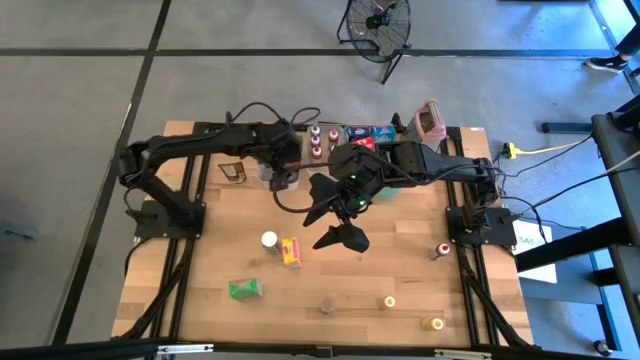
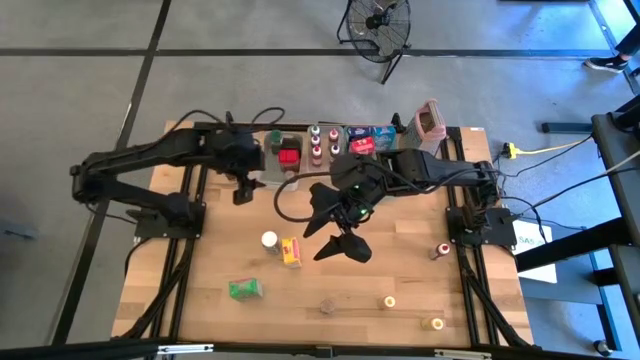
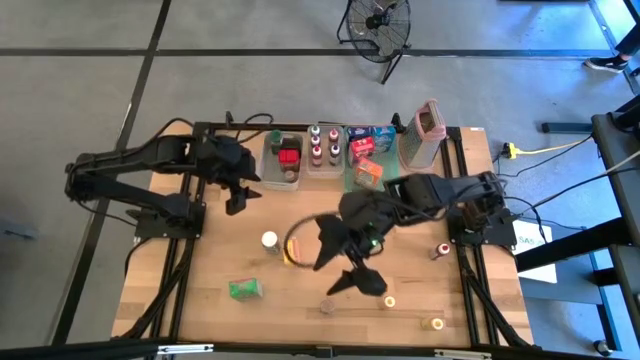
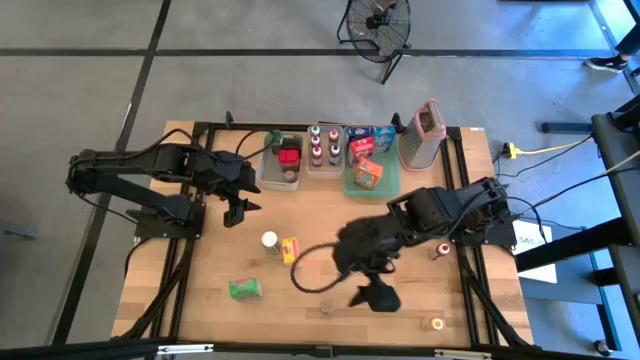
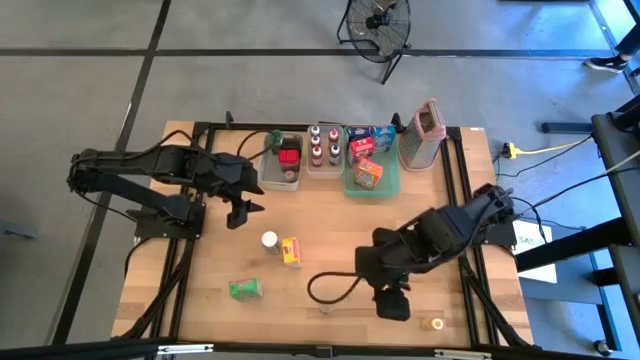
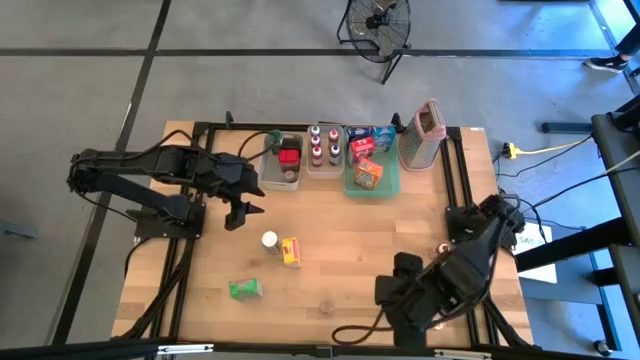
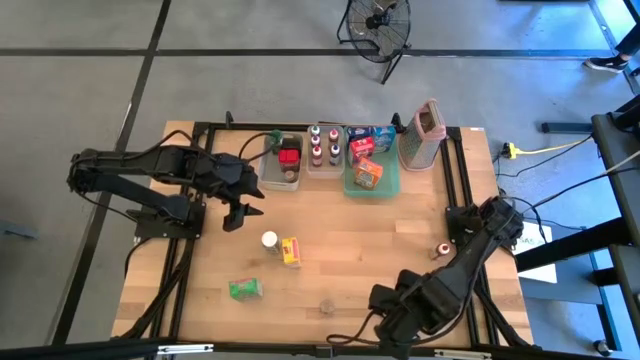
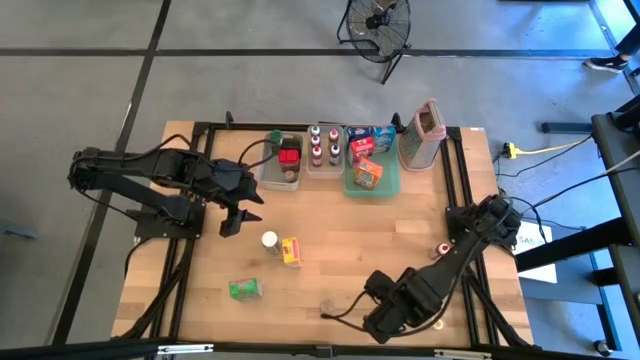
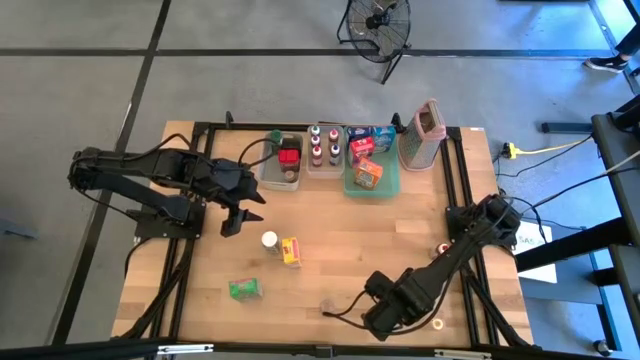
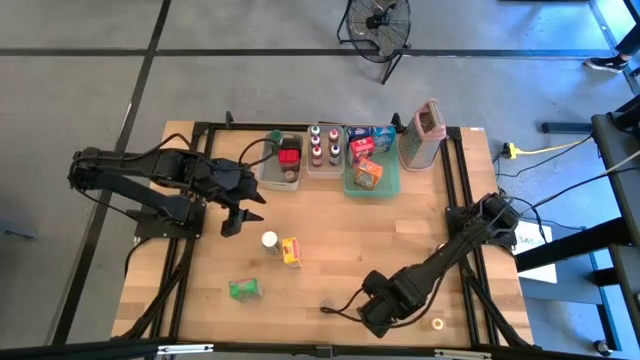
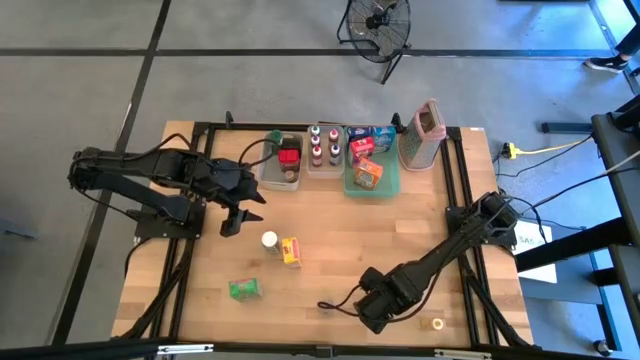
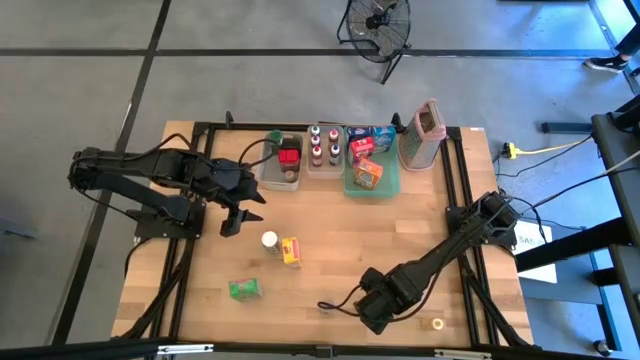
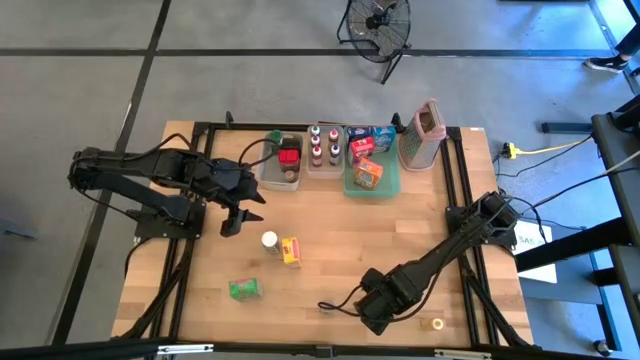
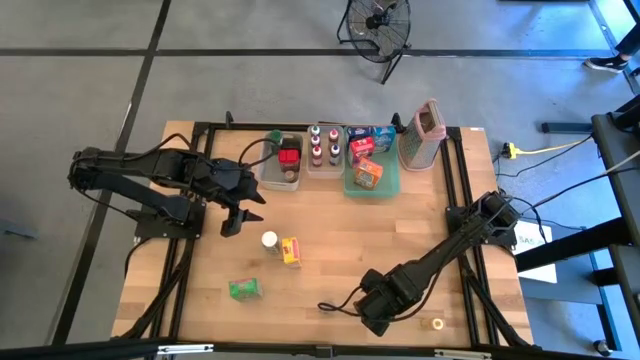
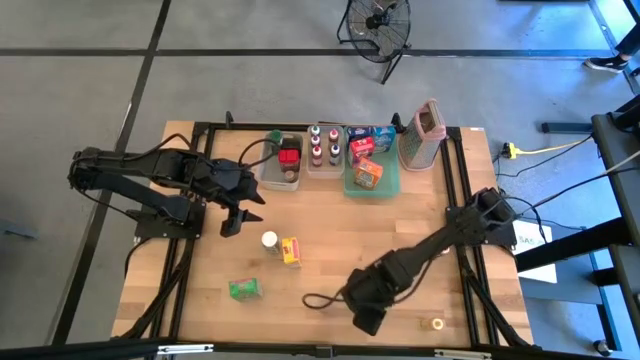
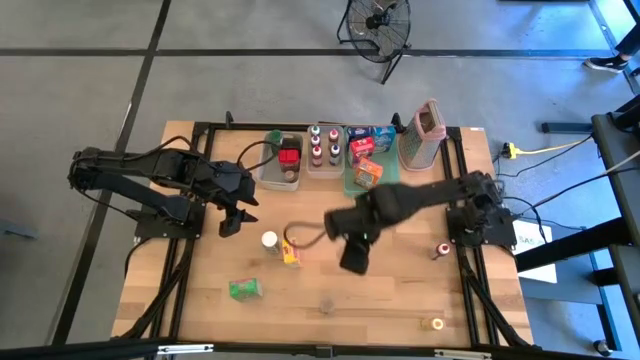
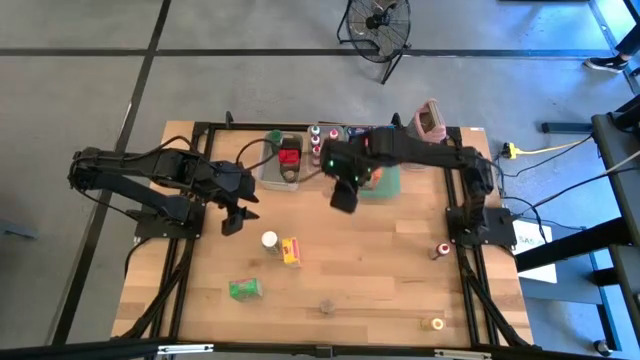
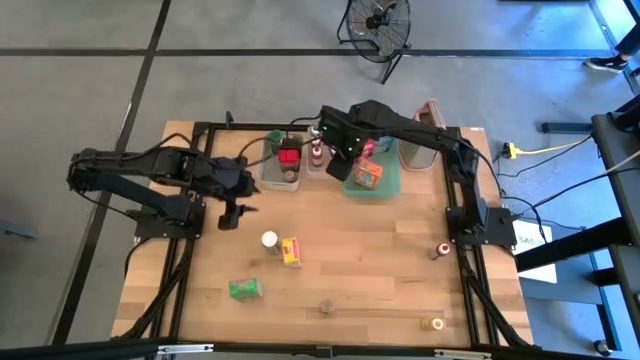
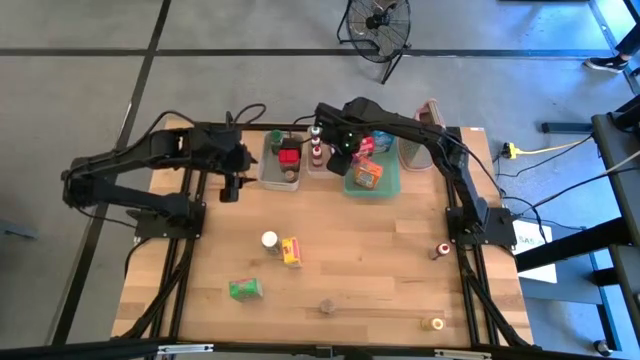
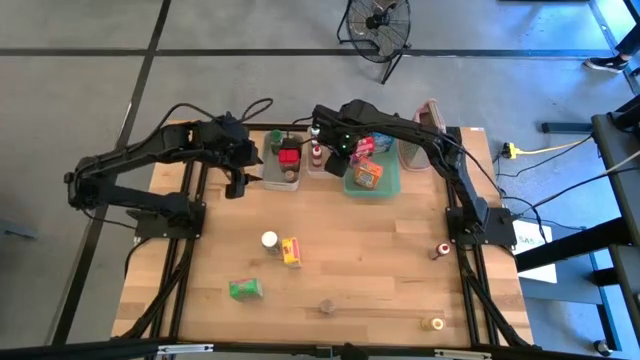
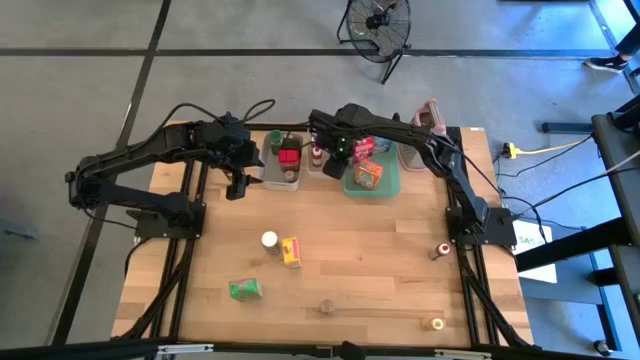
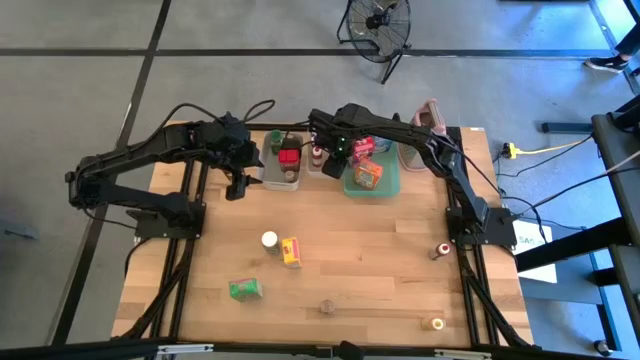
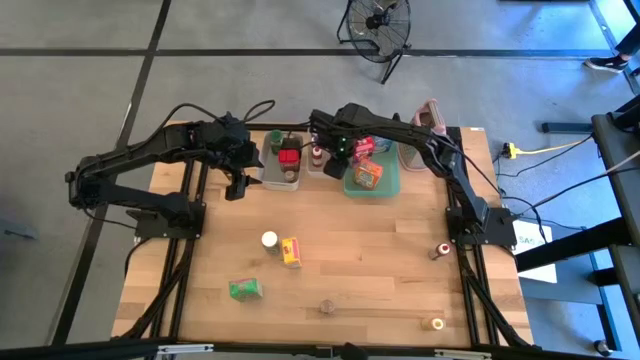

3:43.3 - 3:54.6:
Task: Pick & Place Kitchen Items
Put the left yellow food coloring bottle into the transparent bin

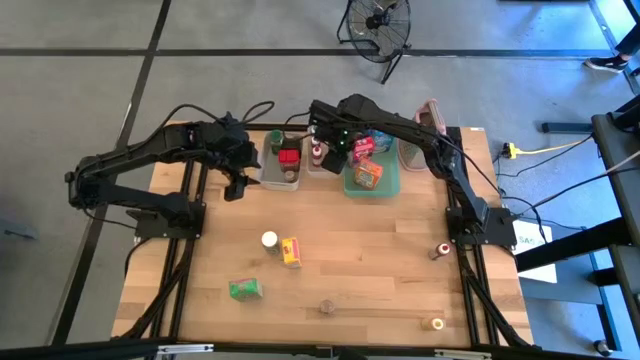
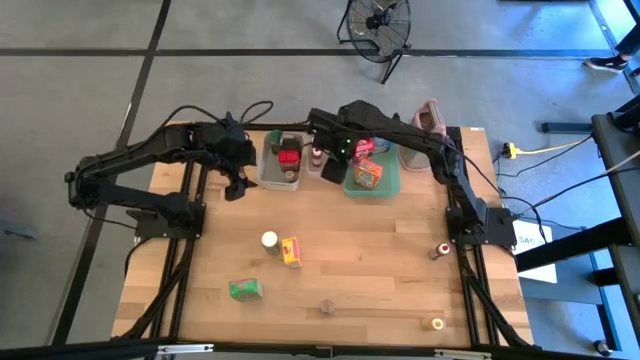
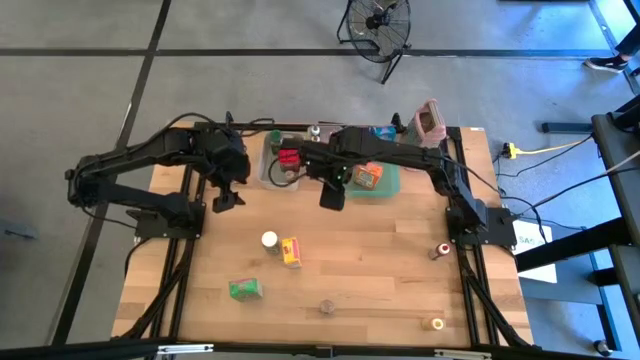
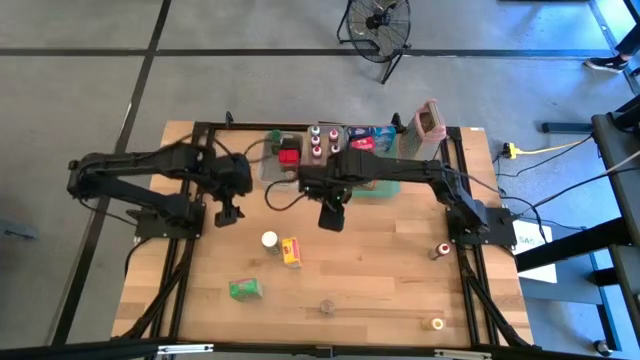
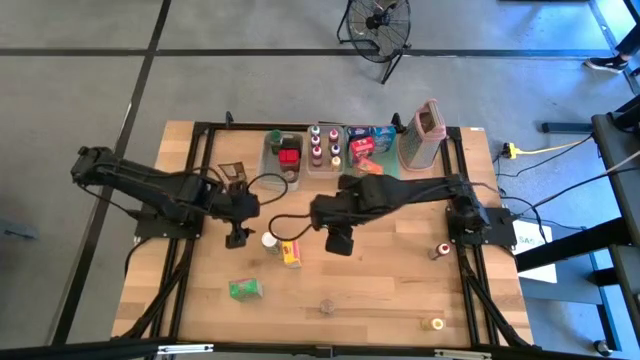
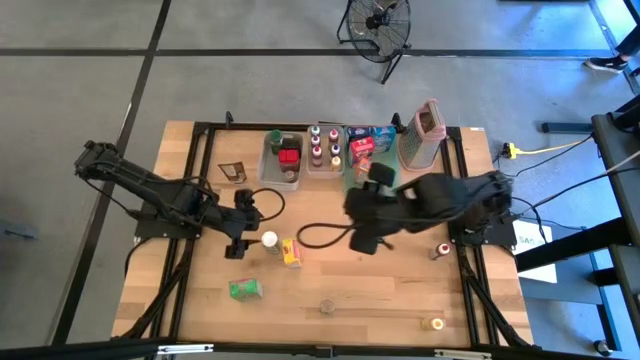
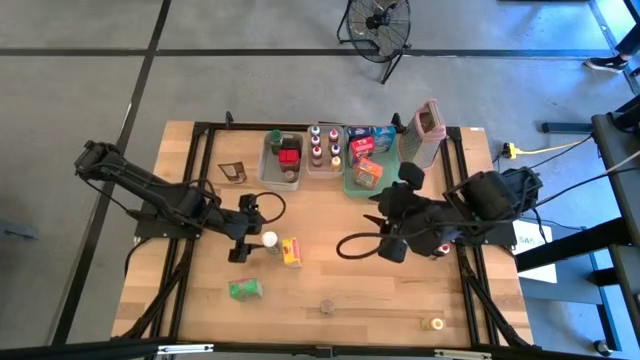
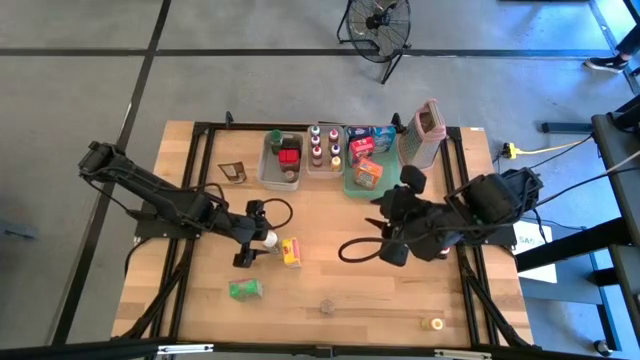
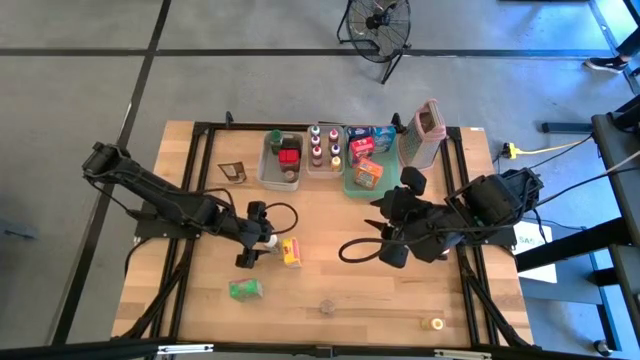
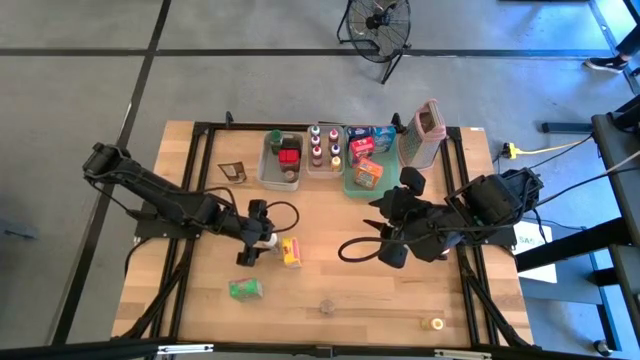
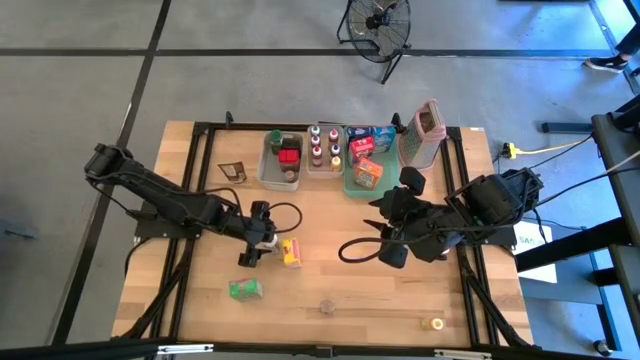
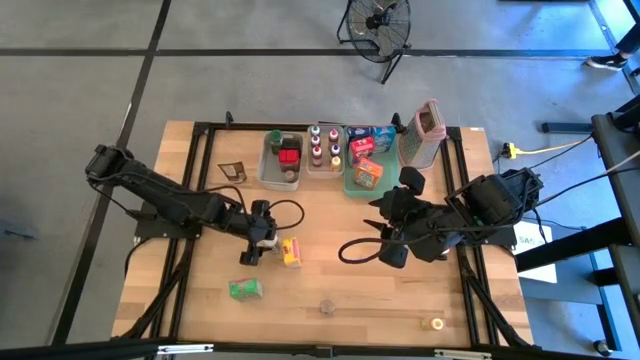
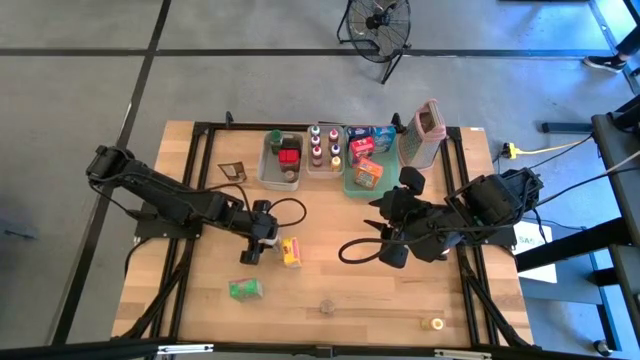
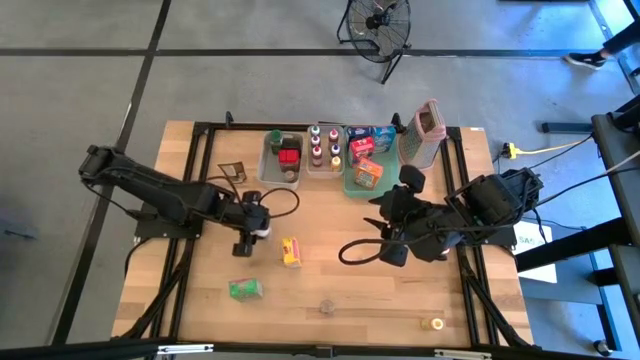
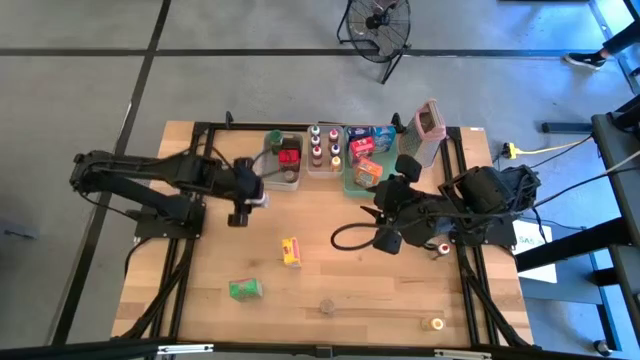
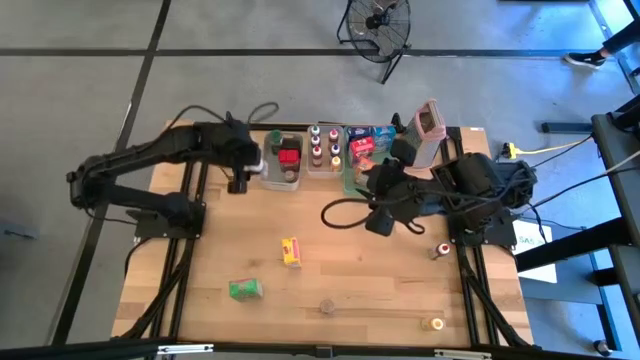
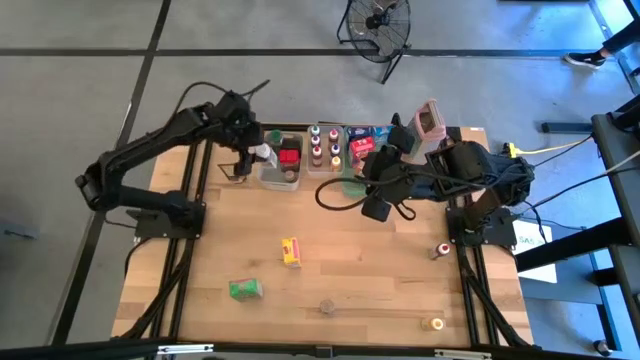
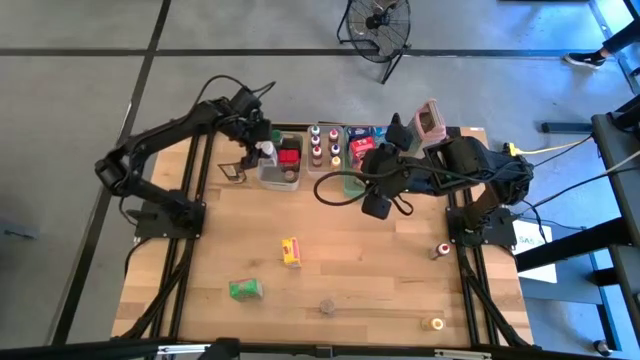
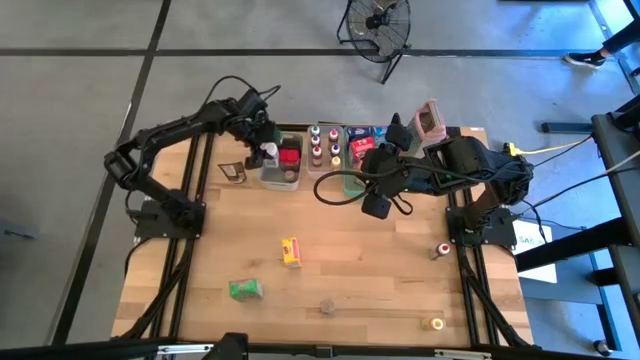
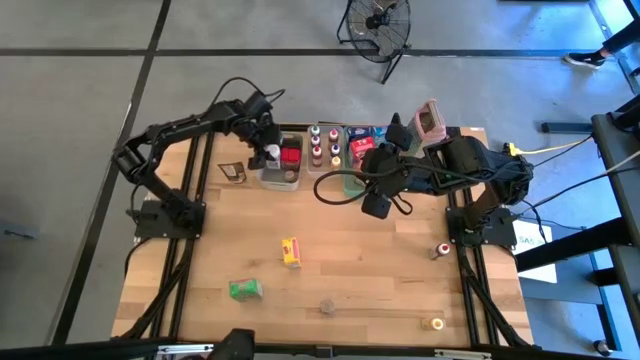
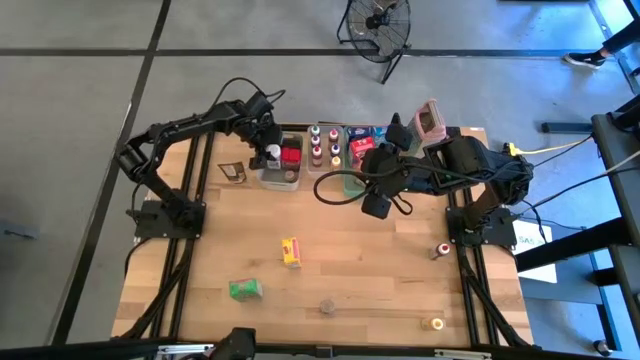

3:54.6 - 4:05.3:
Put the white seasoning bottle into the gray bin
